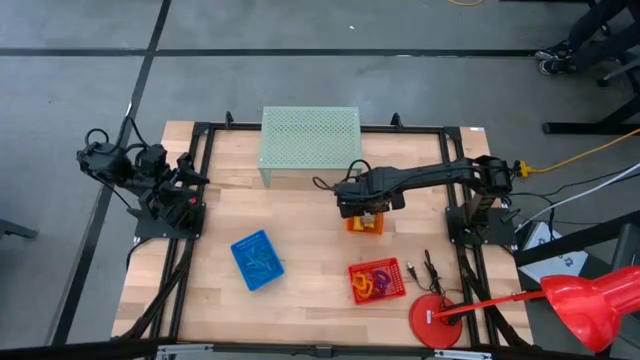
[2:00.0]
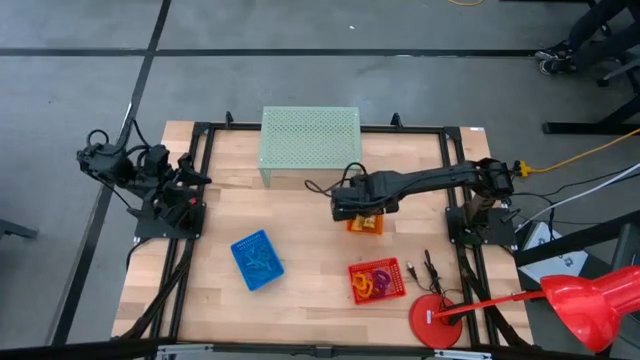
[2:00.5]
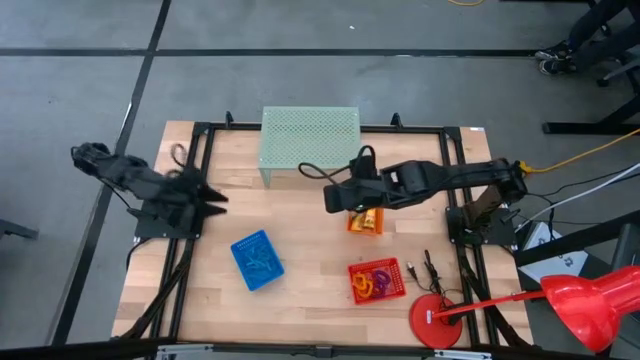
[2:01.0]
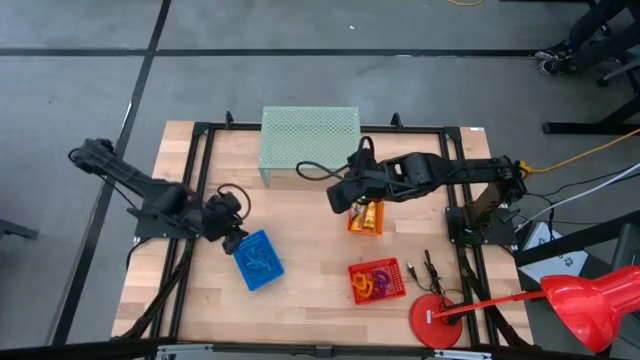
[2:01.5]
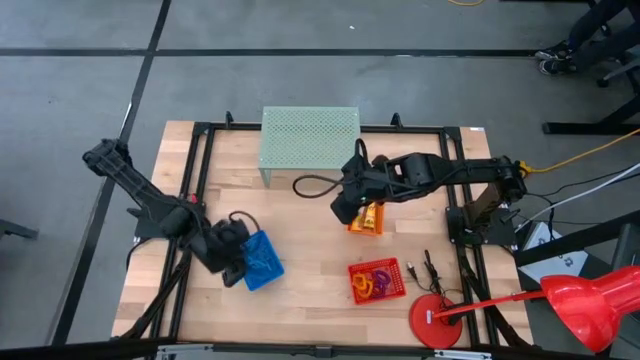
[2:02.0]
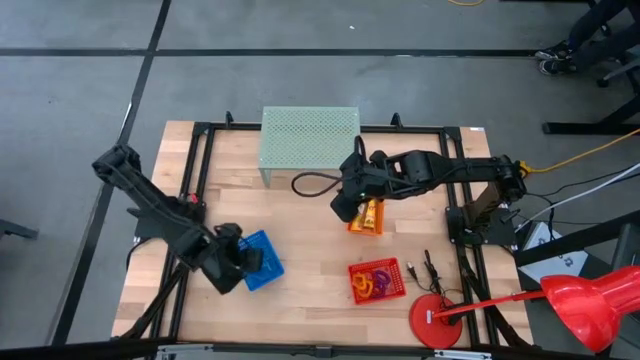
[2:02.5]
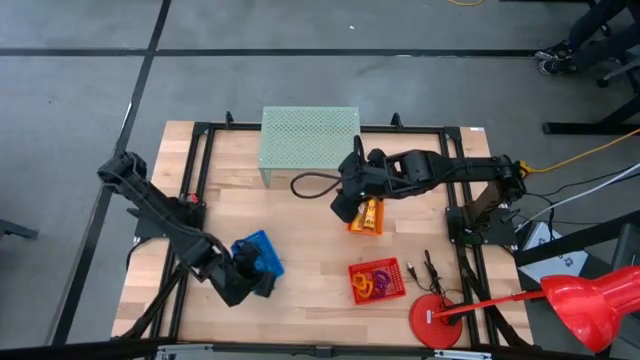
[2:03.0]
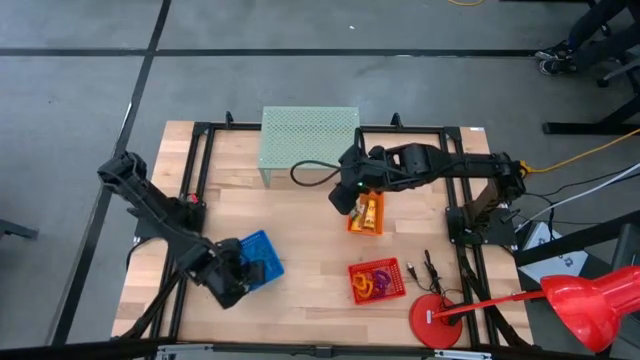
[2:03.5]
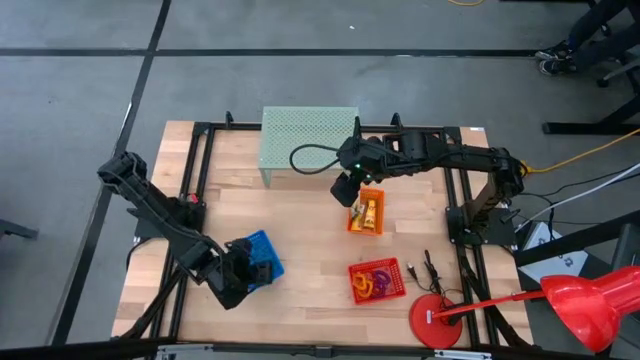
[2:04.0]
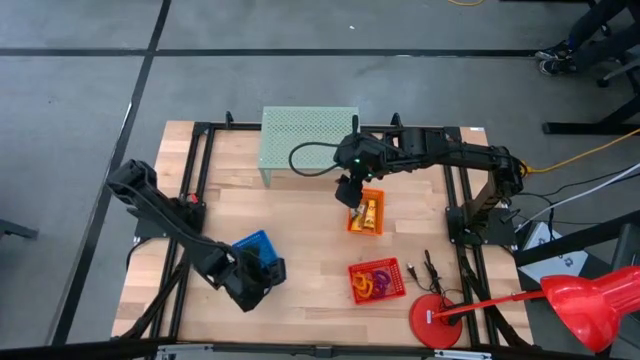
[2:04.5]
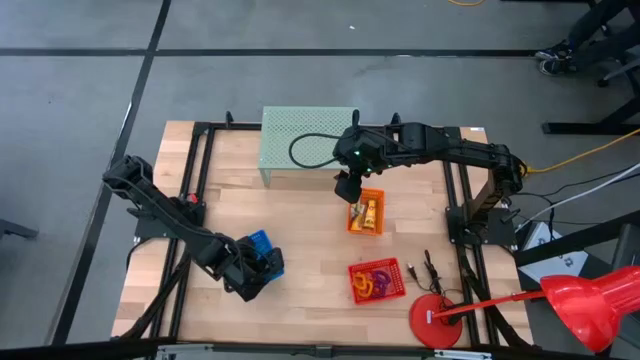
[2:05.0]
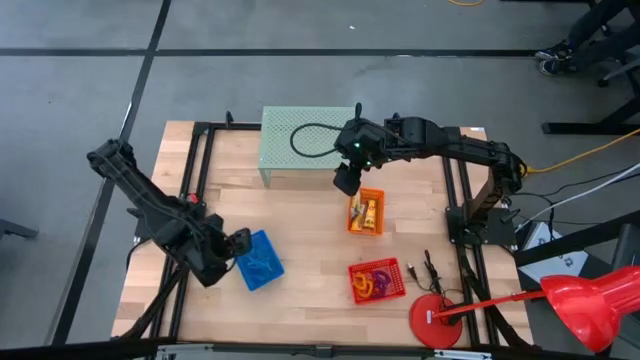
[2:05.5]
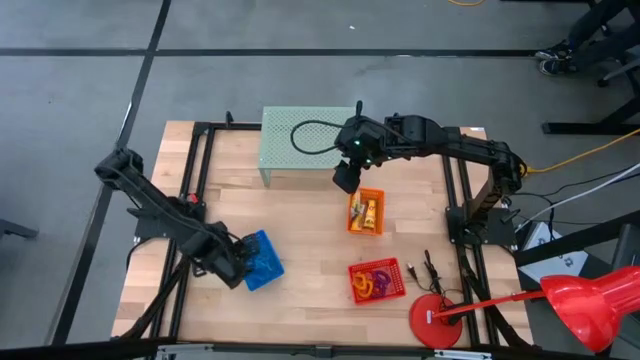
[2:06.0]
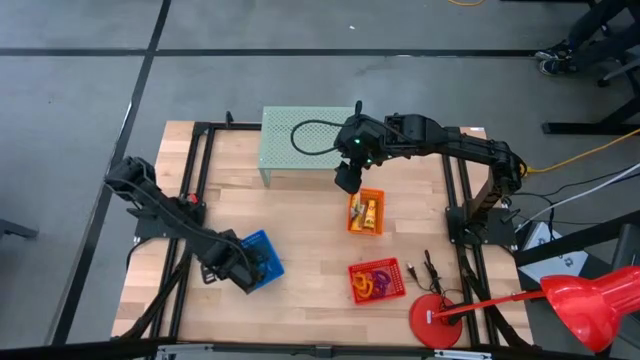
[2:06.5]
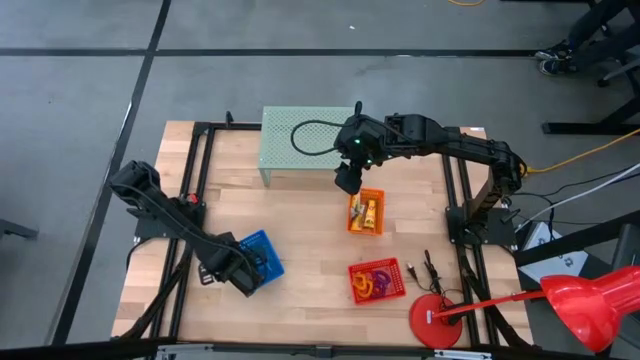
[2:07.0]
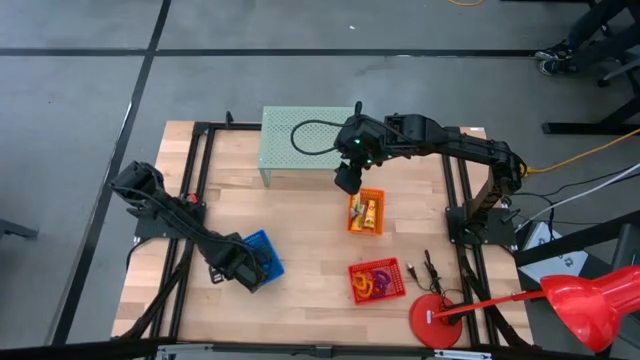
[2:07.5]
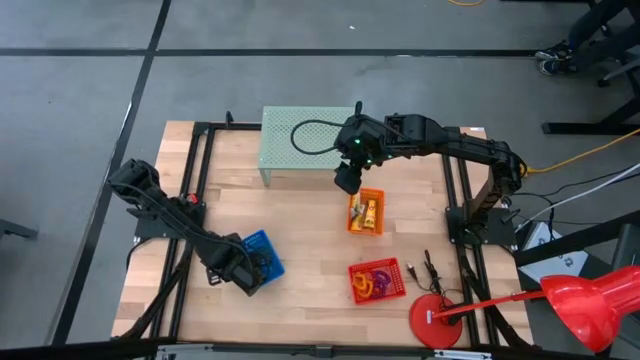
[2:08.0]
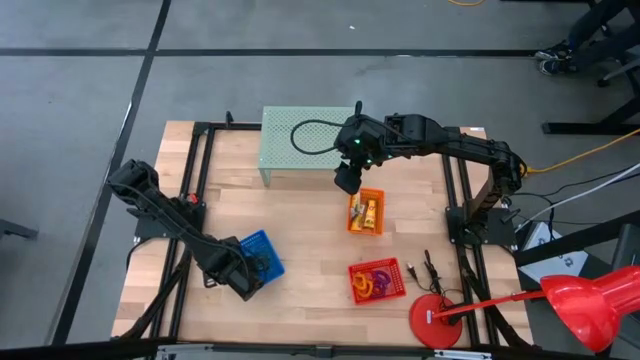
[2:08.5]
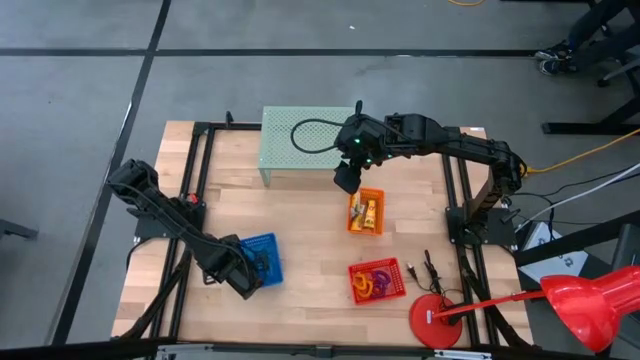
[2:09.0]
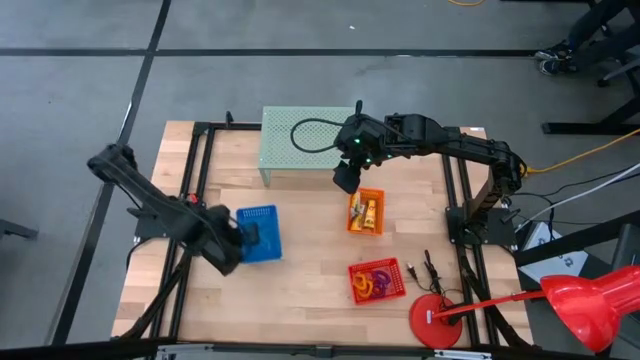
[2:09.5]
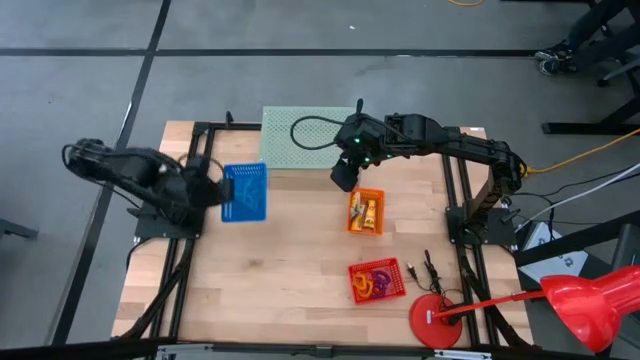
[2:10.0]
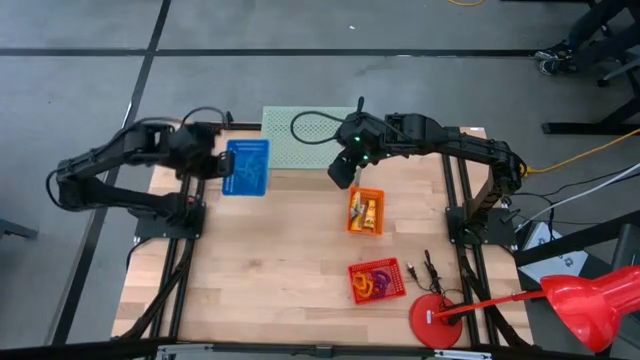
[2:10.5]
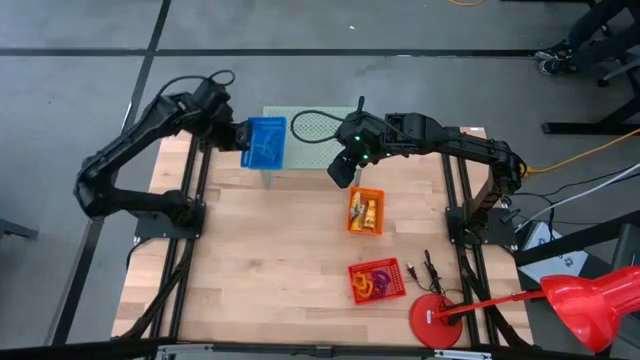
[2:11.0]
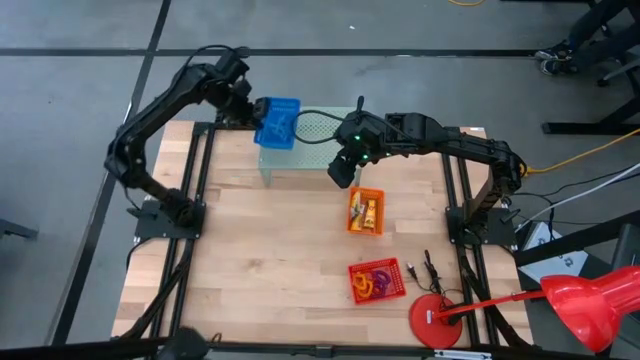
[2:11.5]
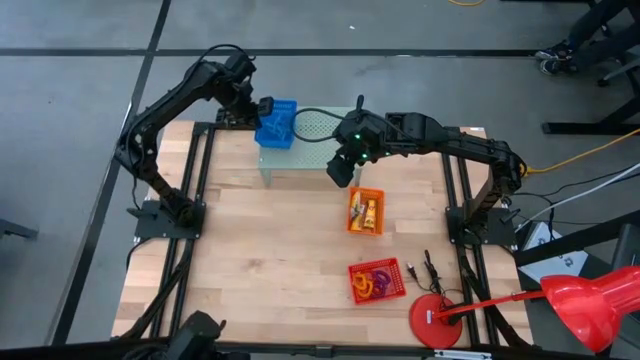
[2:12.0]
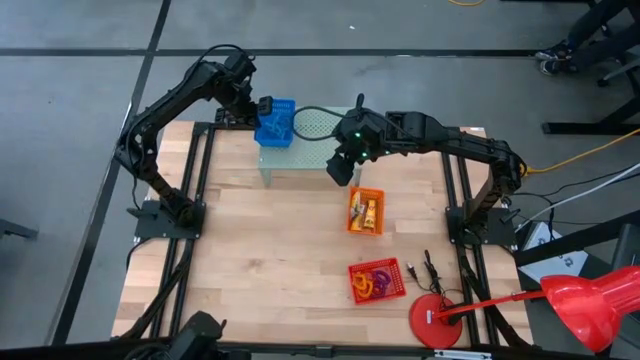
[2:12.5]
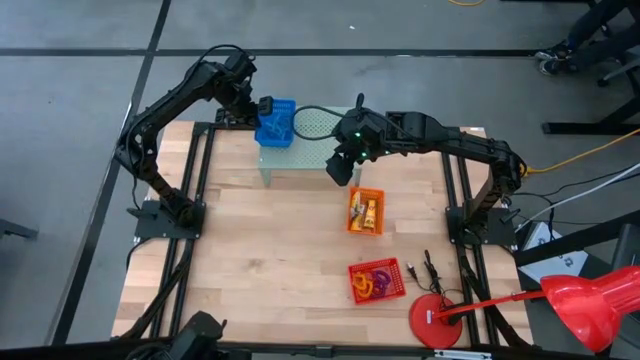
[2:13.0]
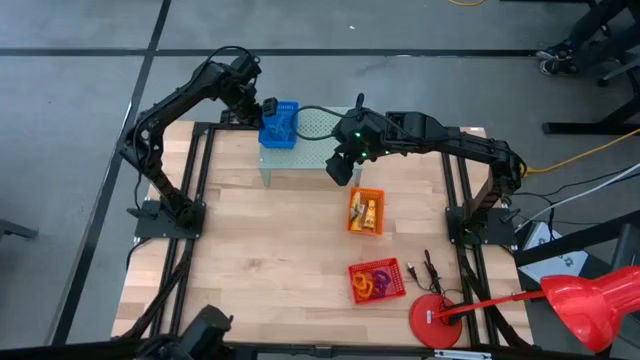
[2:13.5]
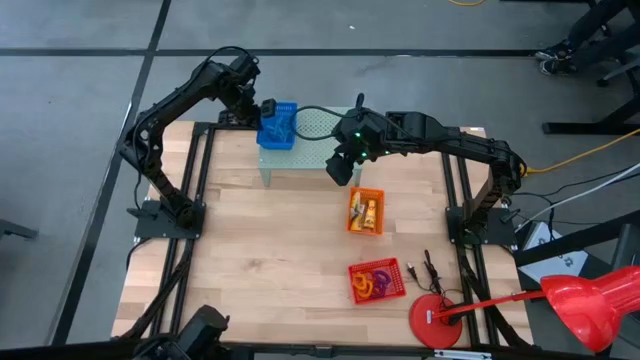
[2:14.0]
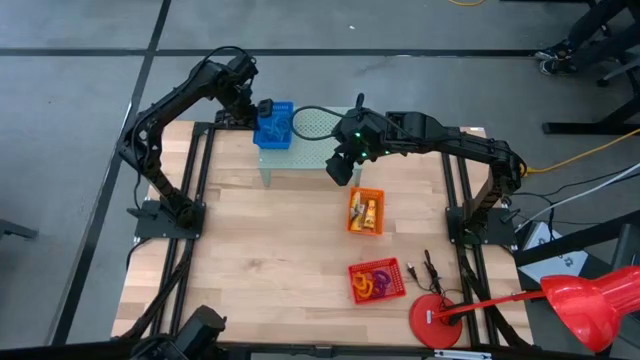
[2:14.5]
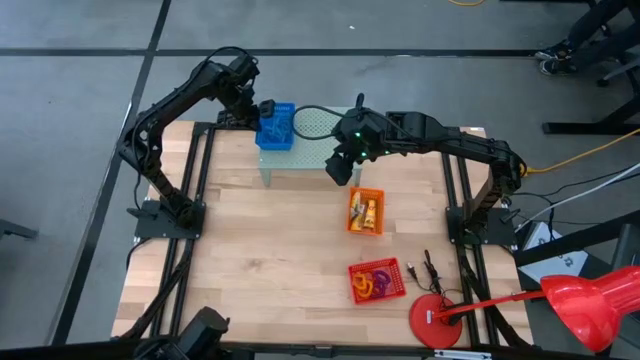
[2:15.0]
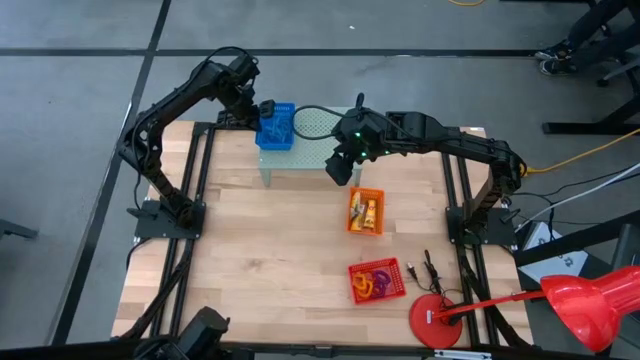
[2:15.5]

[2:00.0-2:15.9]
Task: Pick & Place Office Desk Supplies
Put the blue bin with rubberbands on the shelf

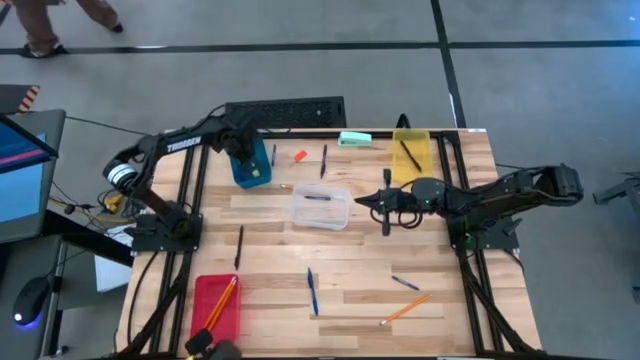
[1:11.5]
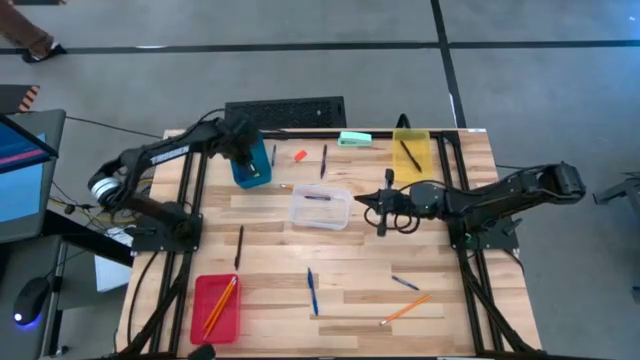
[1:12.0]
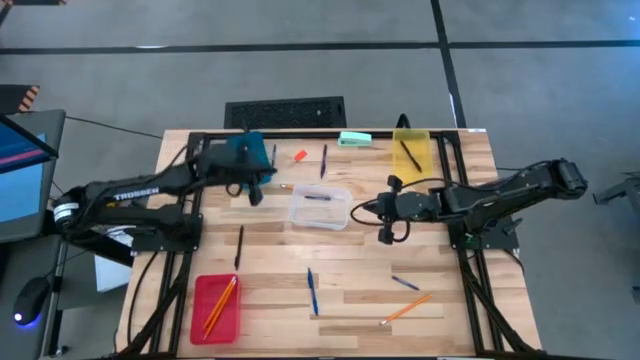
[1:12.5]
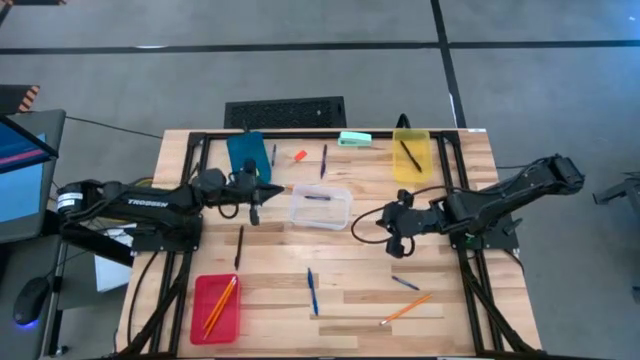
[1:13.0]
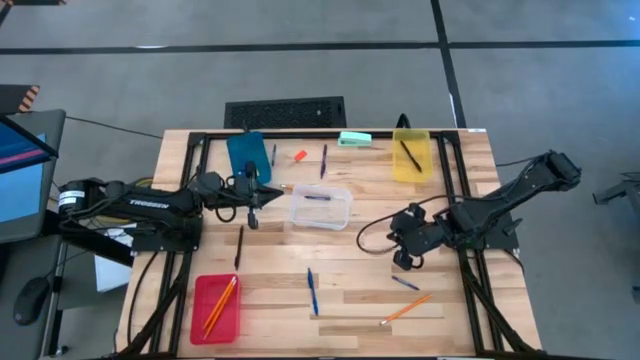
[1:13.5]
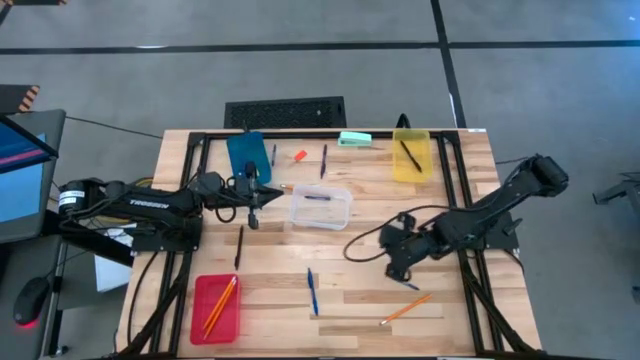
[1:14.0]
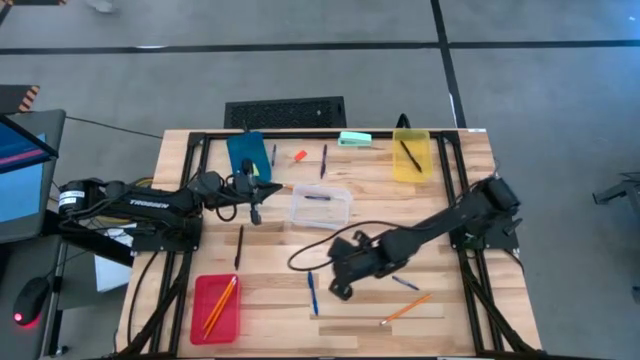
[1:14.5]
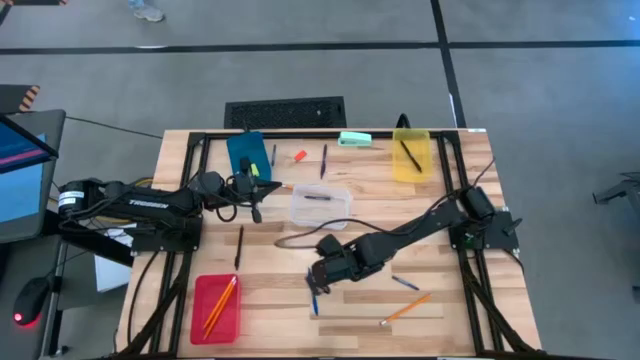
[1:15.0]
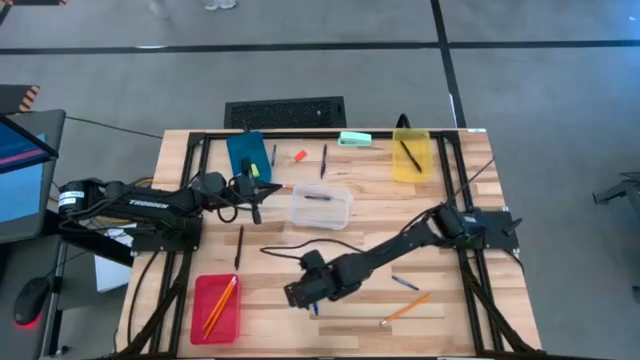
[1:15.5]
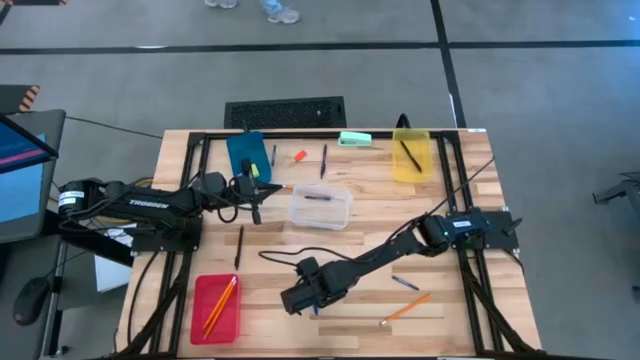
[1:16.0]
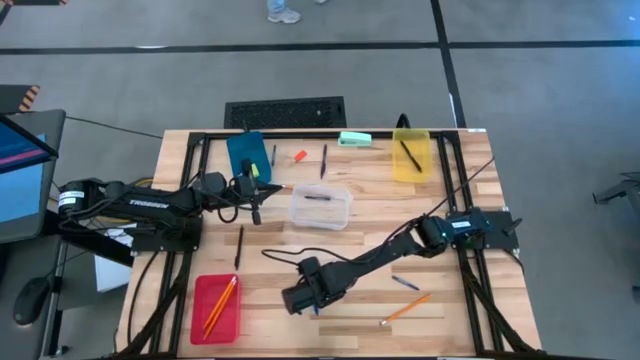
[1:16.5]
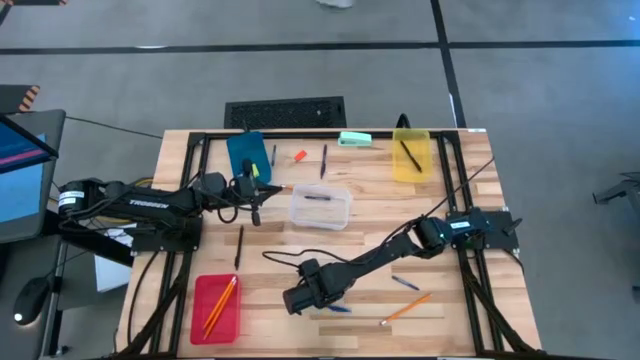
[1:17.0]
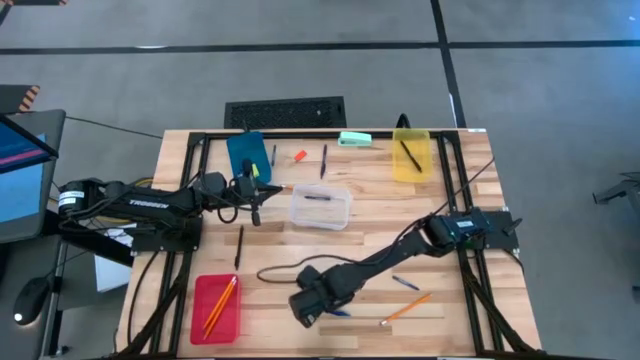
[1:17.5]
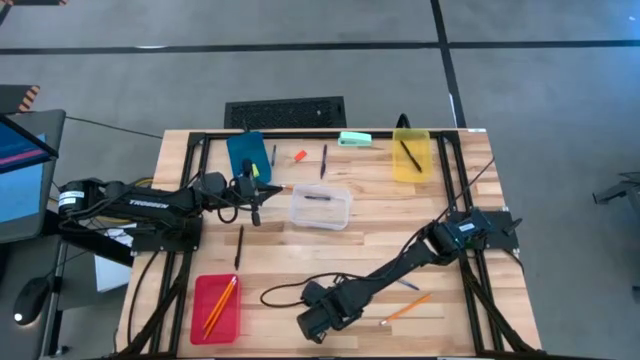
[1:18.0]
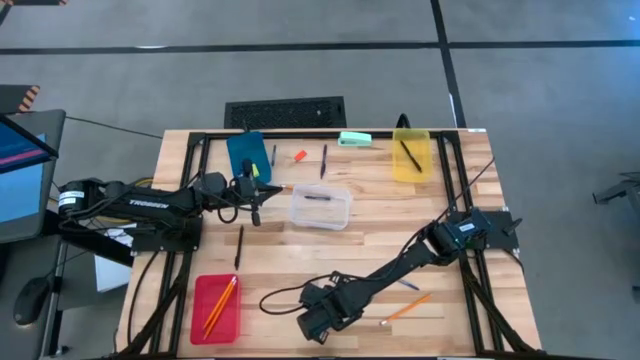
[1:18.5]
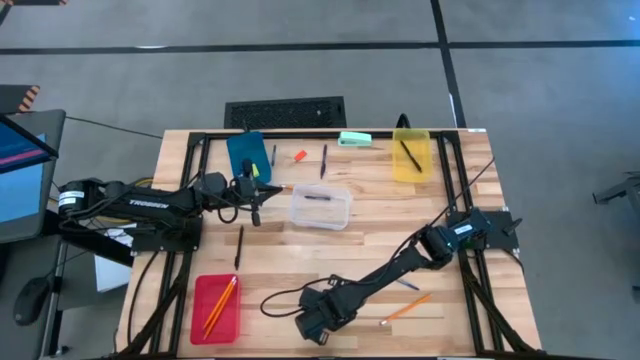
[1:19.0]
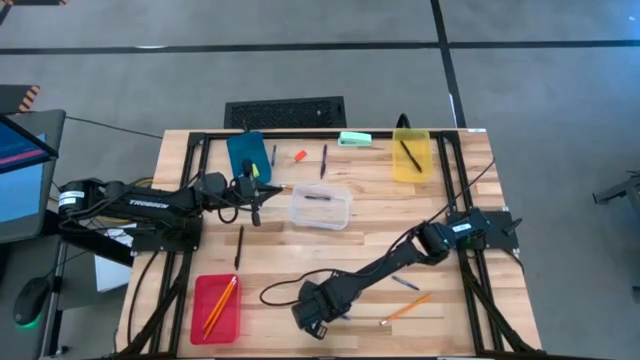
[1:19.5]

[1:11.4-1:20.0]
Task: Sort crayons/erasers/pens/pencils in bins
Put the blue pen into the yellow bin
